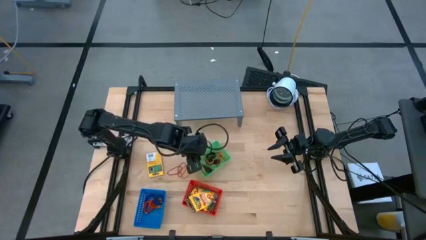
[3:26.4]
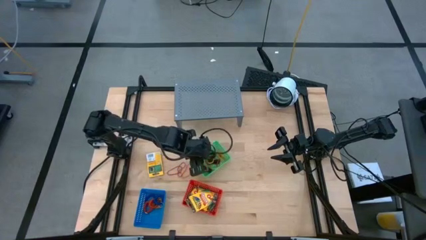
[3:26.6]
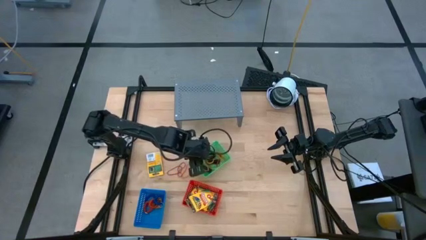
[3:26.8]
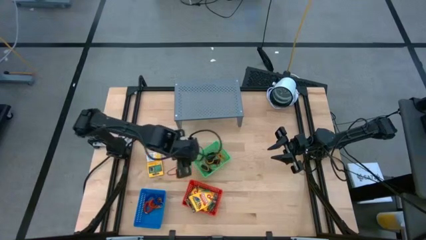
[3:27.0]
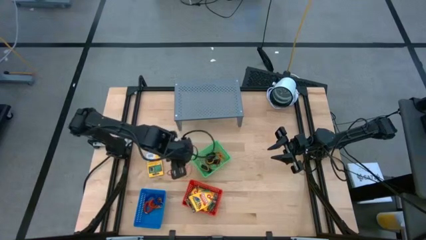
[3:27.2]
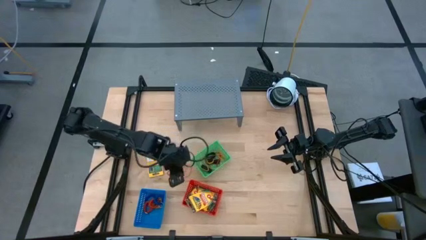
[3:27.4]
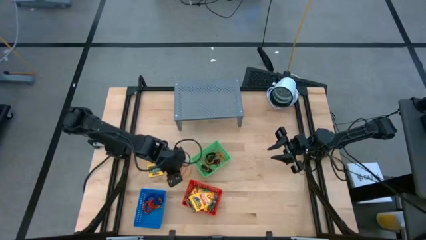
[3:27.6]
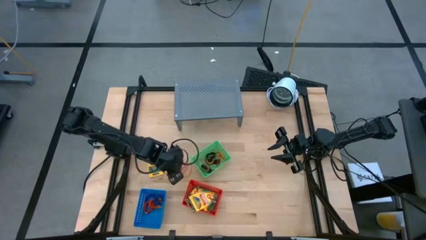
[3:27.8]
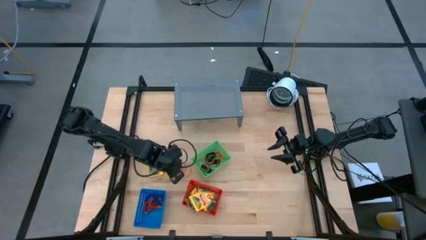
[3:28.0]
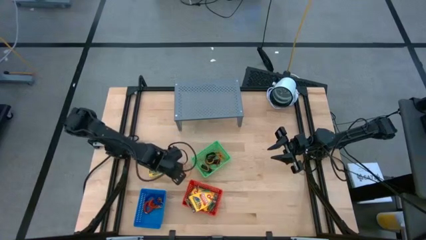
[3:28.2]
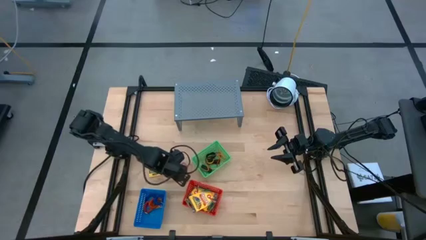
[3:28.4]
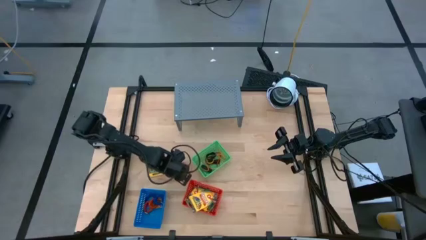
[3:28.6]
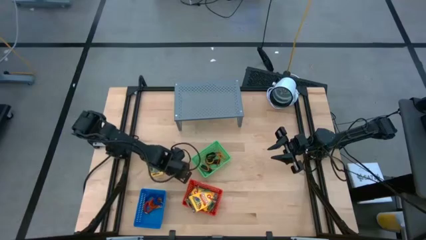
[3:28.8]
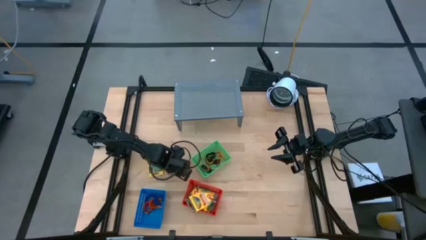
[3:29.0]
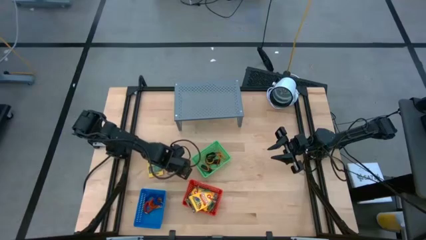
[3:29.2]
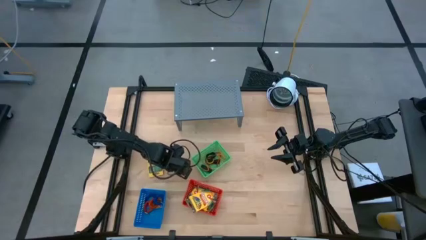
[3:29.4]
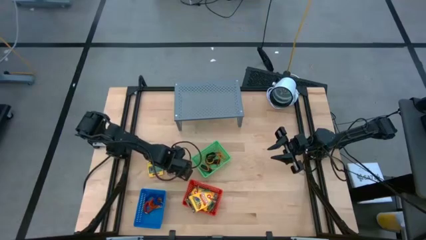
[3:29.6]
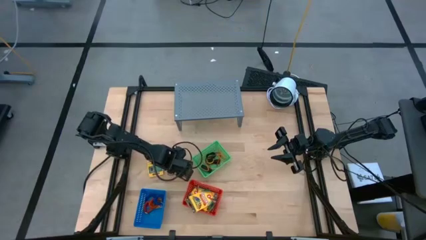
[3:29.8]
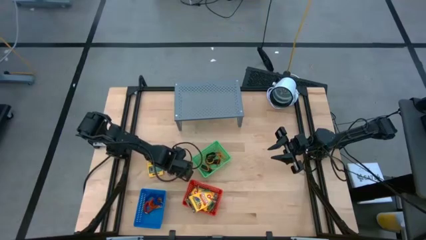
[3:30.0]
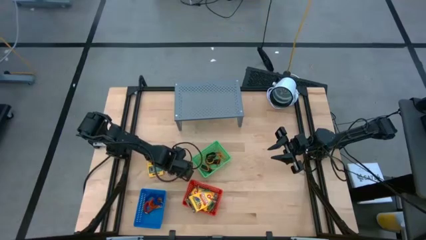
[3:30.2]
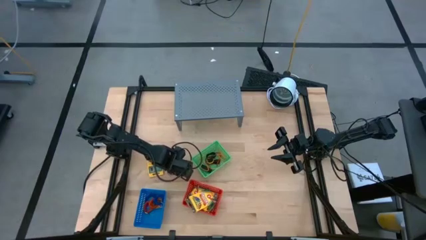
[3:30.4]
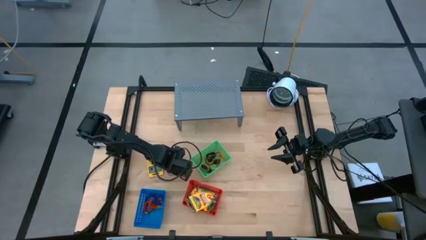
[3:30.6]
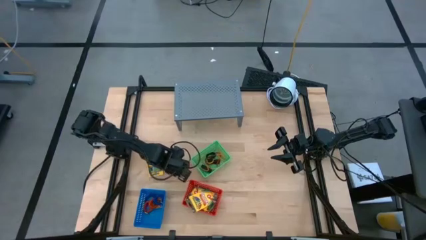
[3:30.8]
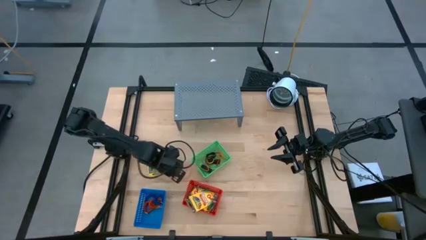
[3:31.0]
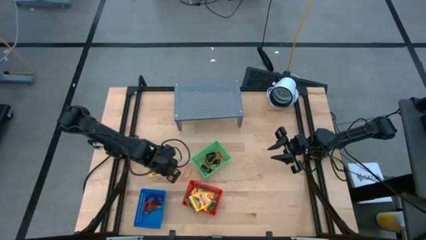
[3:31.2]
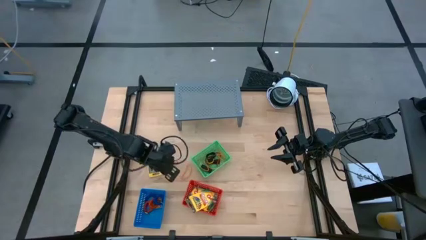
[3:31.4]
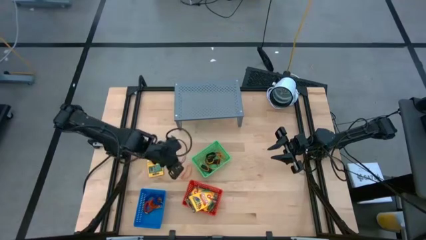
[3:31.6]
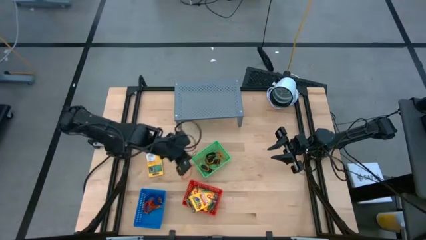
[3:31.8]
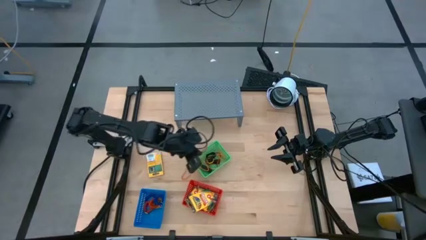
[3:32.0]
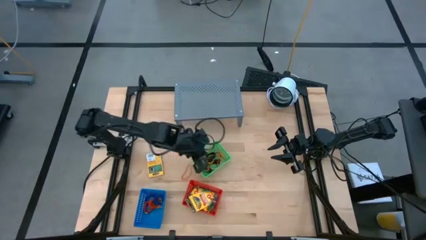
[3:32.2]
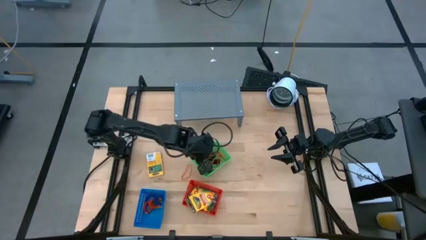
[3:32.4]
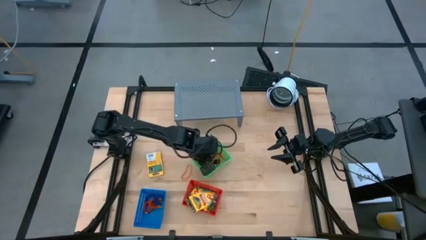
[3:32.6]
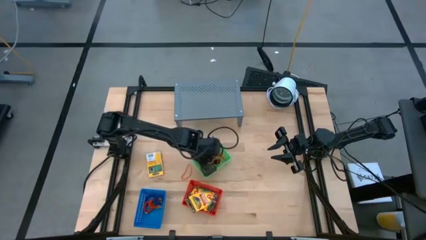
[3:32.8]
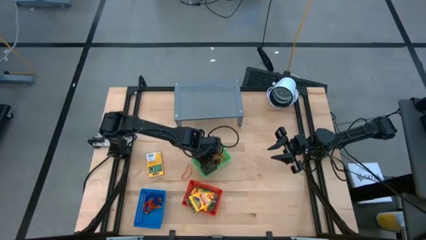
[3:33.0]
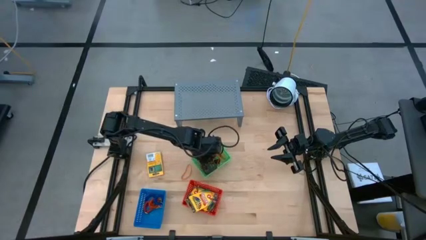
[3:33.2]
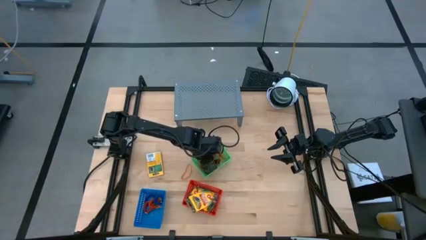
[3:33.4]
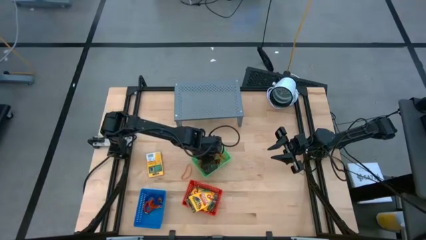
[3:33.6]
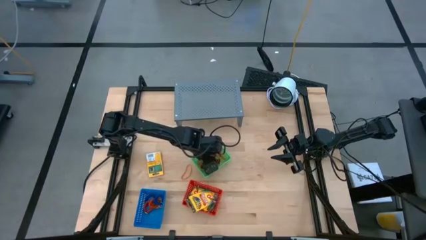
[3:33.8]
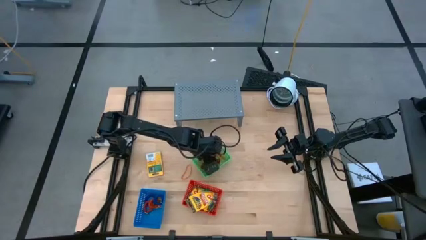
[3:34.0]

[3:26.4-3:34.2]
Task: Pick & Place Office Desk Supplies
Put the red rubber band into the green basket

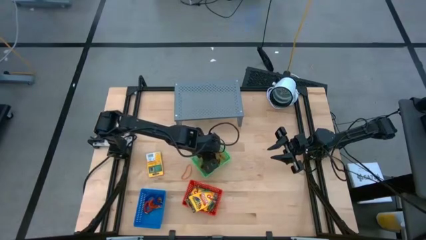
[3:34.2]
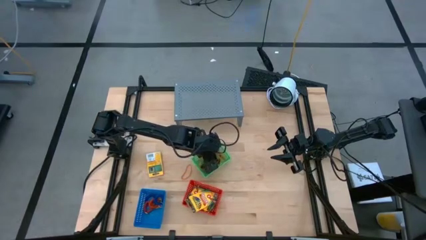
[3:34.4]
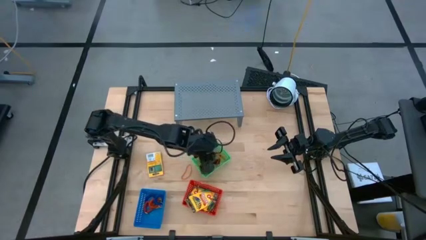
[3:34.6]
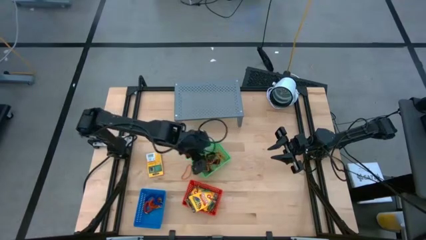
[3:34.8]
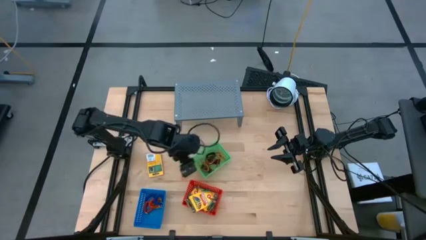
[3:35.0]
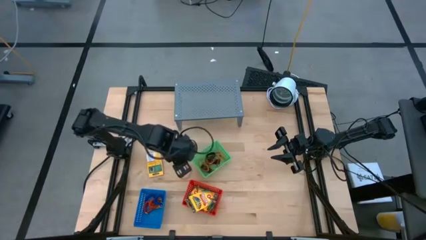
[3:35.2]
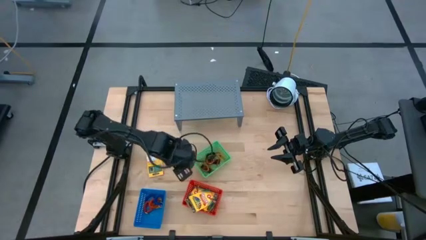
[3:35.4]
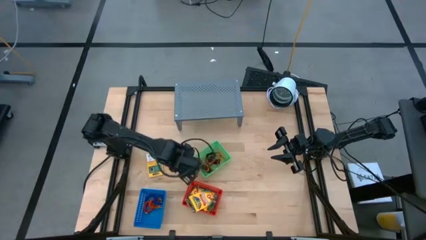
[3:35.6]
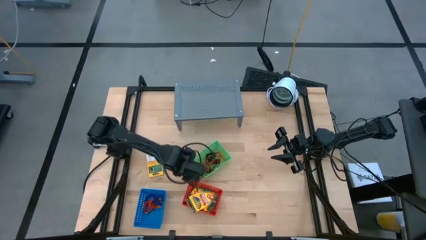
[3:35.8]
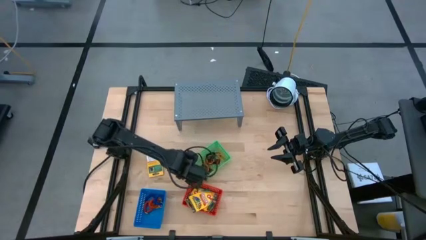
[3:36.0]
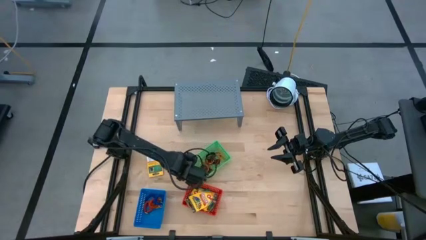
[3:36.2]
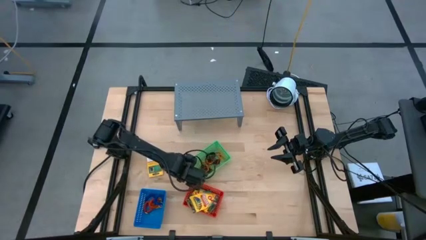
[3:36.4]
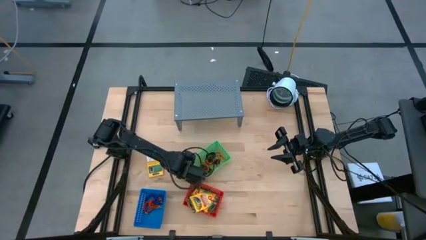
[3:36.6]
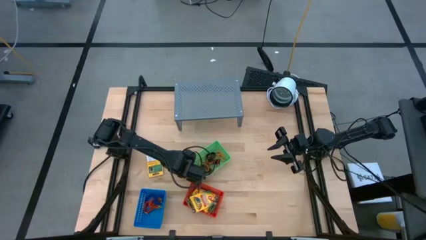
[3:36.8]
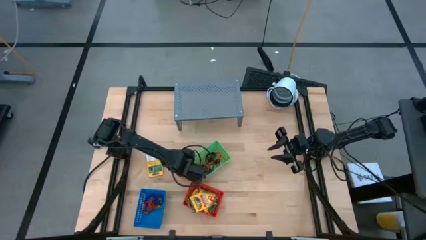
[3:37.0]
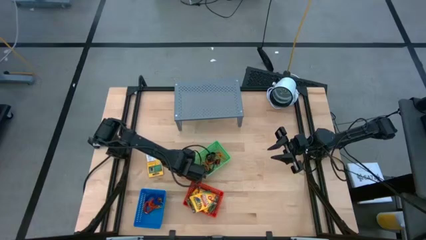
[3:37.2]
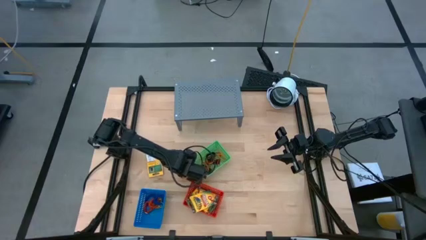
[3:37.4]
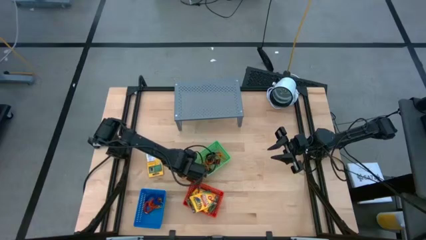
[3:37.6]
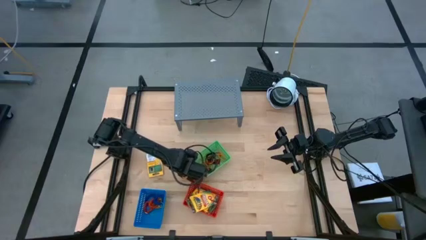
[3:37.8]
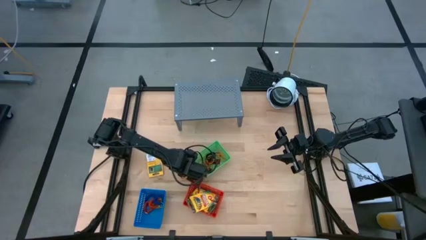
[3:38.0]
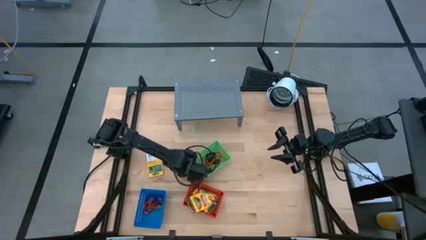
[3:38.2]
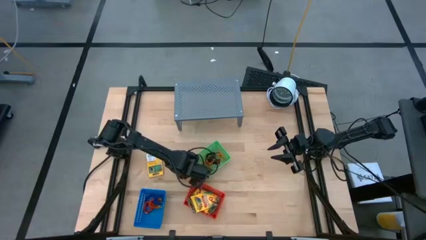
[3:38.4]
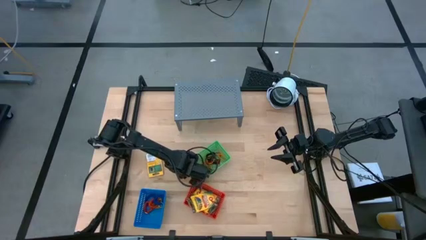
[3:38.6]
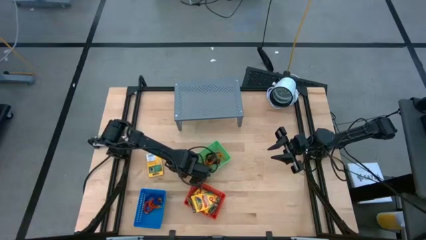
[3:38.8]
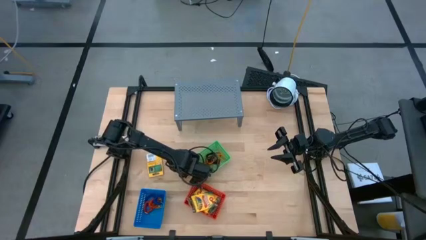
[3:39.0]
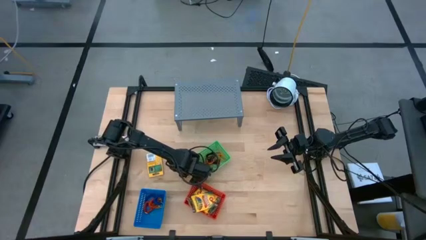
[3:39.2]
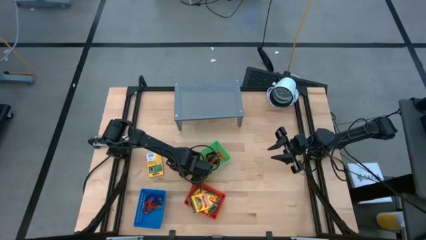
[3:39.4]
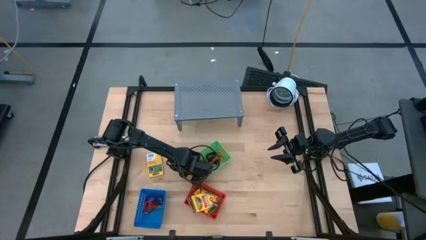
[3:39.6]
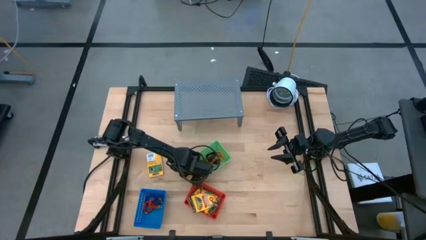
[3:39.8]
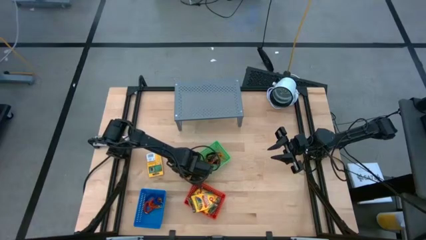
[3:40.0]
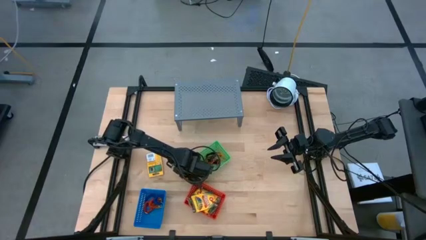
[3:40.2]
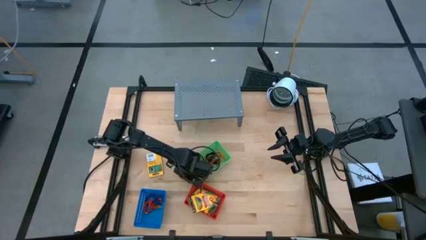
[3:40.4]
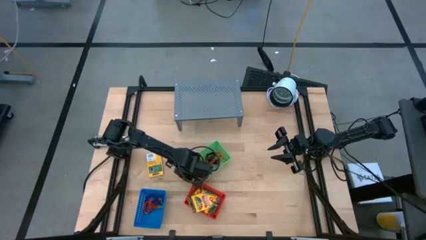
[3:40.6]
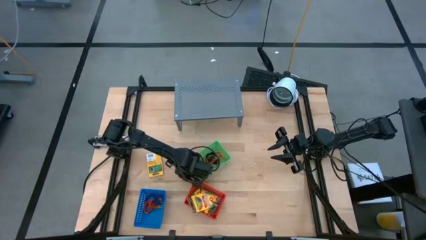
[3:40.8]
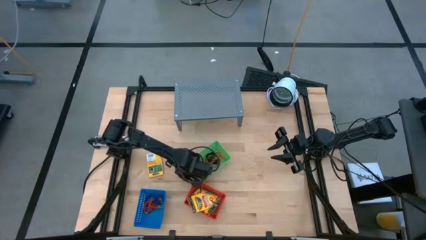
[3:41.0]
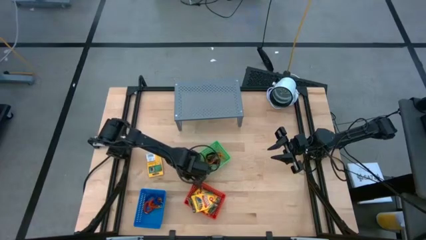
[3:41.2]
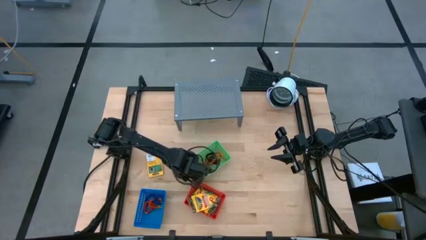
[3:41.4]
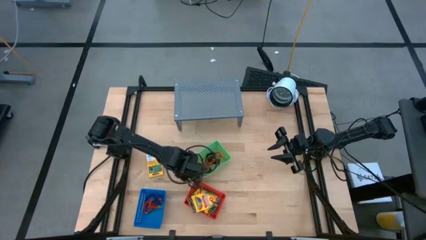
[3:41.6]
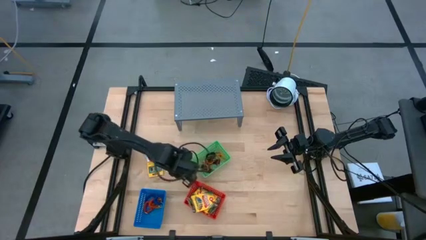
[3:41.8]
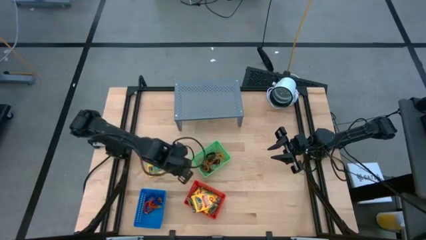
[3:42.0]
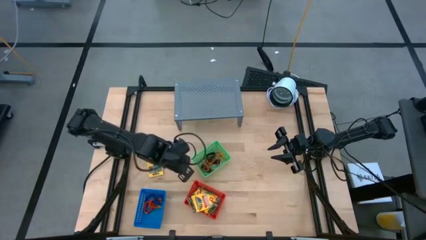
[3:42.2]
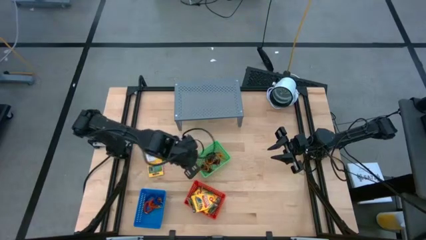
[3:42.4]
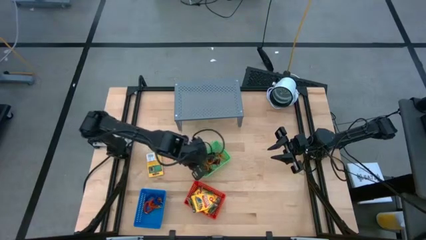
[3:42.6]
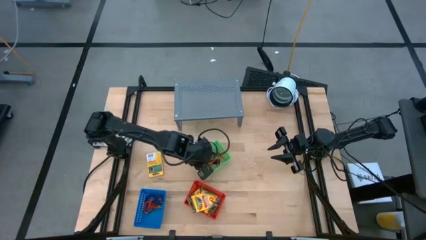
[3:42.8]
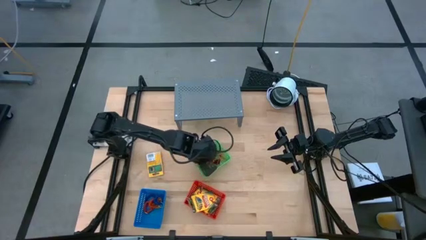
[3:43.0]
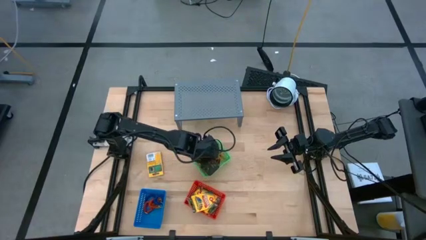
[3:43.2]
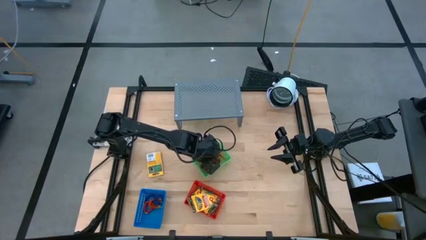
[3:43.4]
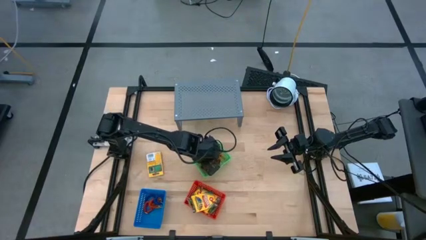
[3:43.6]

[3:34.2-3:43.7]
Put the orange rubber band into the green basket
